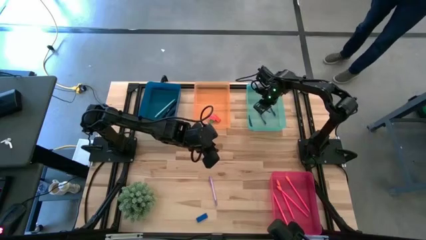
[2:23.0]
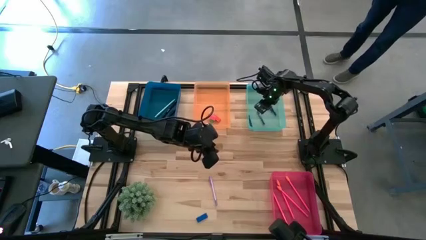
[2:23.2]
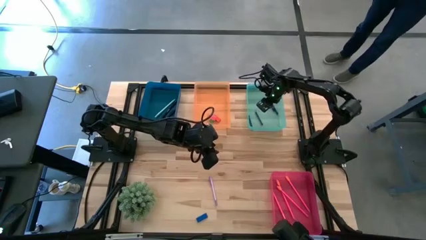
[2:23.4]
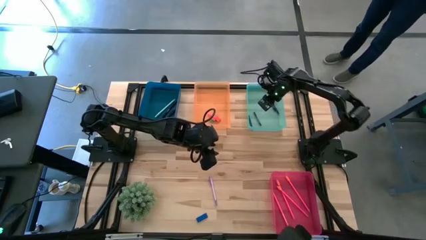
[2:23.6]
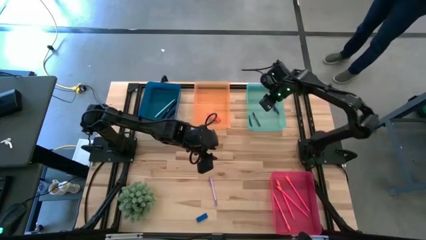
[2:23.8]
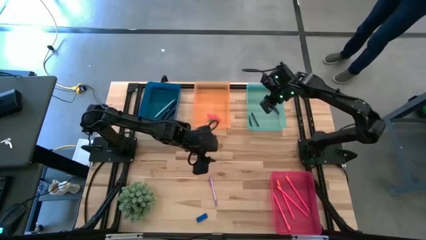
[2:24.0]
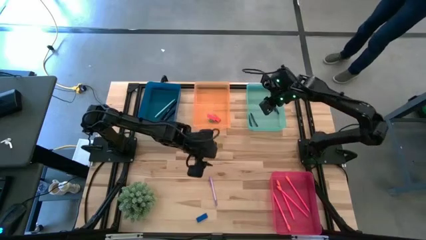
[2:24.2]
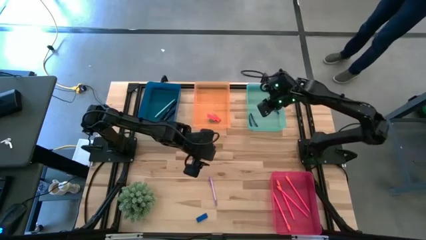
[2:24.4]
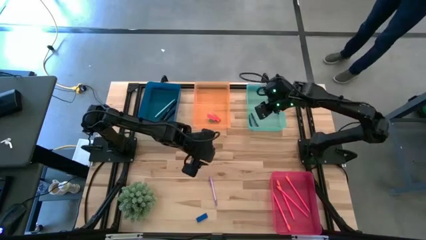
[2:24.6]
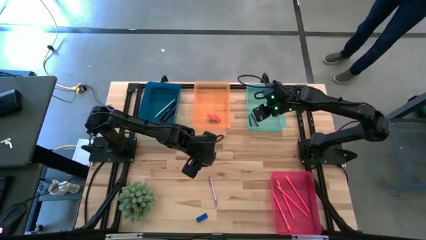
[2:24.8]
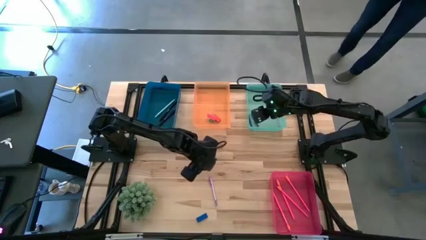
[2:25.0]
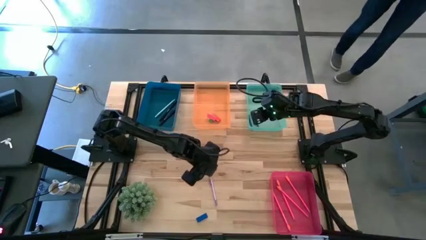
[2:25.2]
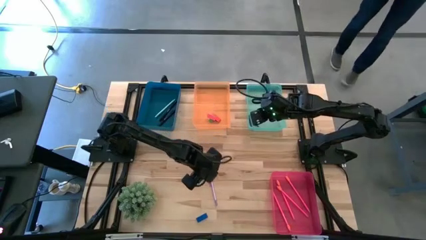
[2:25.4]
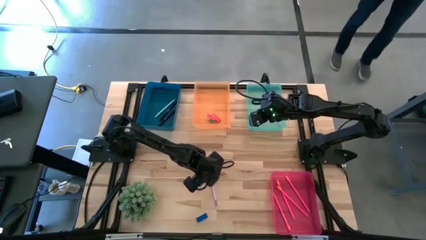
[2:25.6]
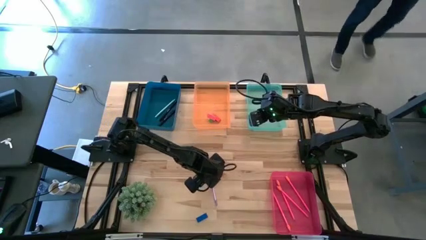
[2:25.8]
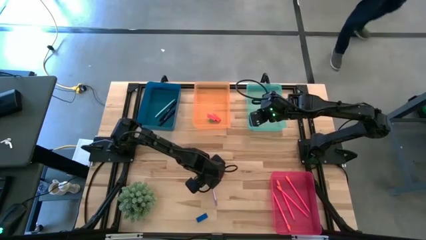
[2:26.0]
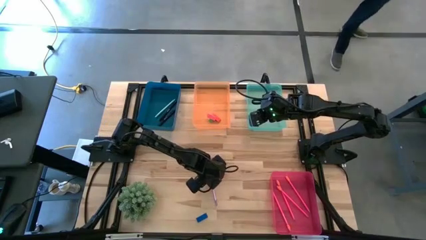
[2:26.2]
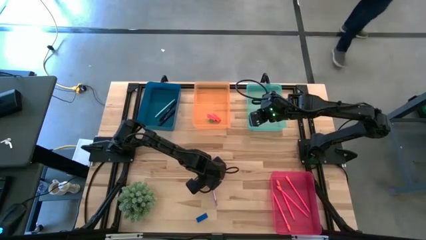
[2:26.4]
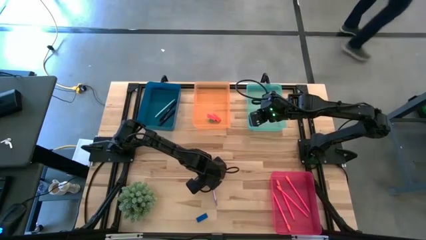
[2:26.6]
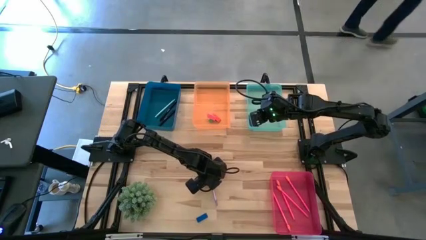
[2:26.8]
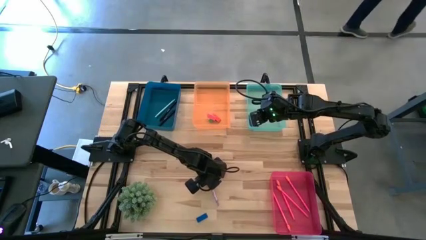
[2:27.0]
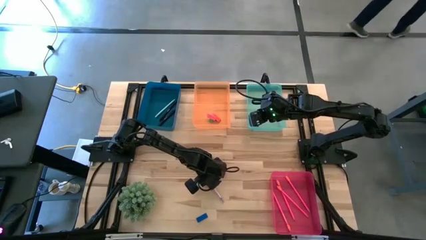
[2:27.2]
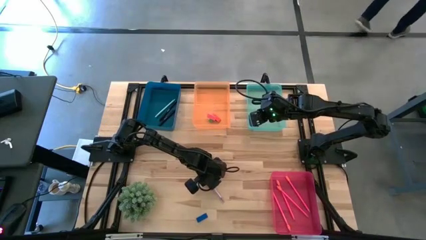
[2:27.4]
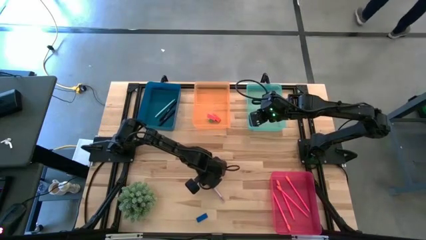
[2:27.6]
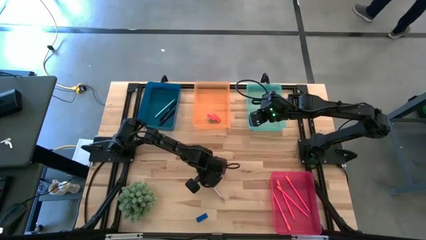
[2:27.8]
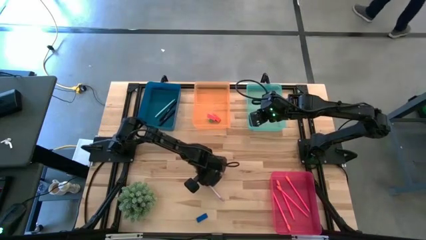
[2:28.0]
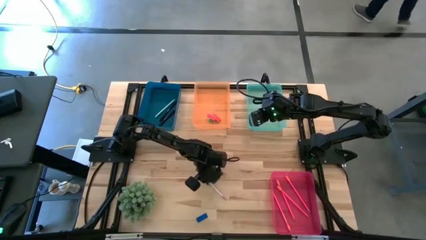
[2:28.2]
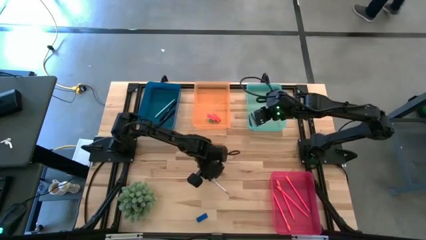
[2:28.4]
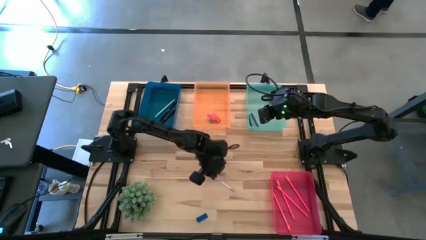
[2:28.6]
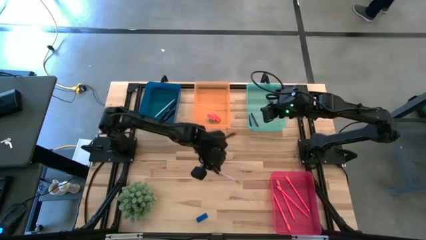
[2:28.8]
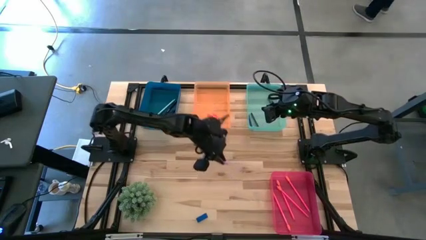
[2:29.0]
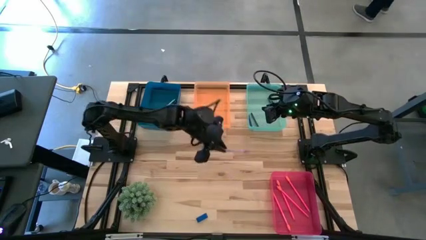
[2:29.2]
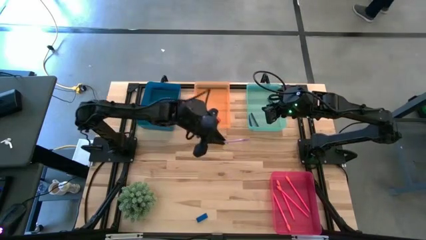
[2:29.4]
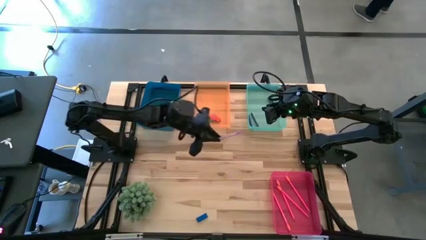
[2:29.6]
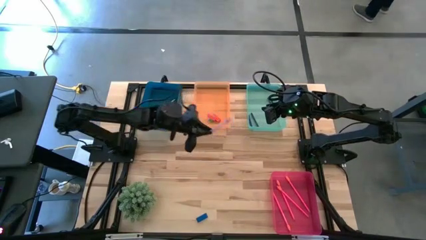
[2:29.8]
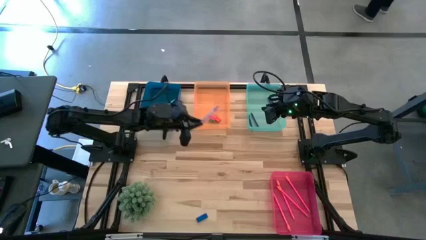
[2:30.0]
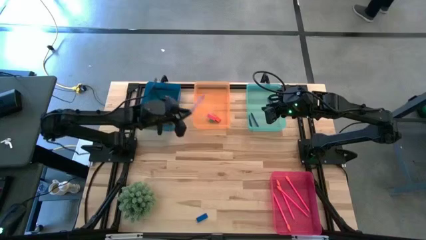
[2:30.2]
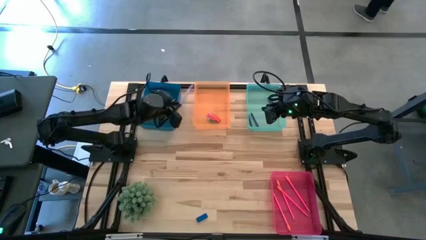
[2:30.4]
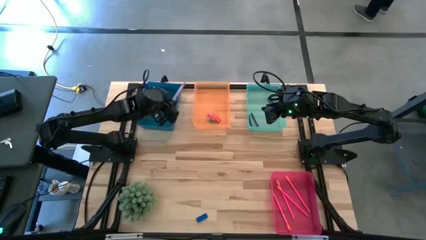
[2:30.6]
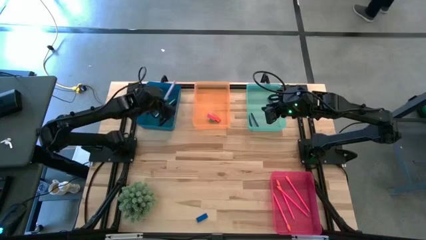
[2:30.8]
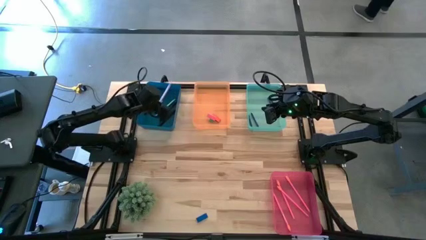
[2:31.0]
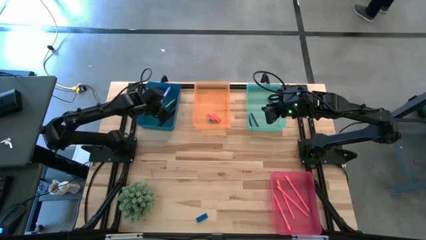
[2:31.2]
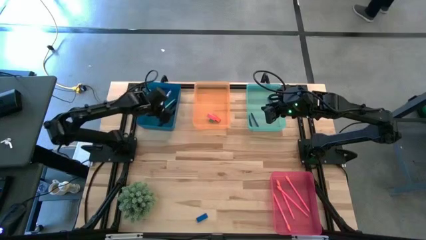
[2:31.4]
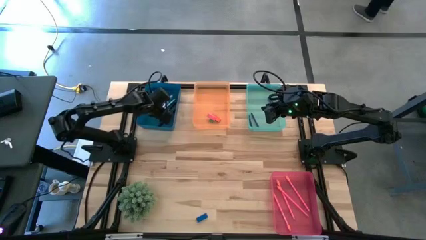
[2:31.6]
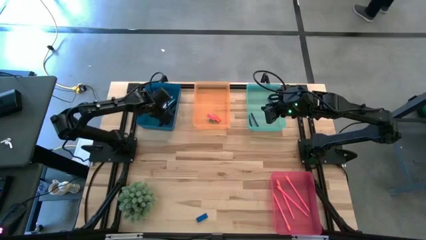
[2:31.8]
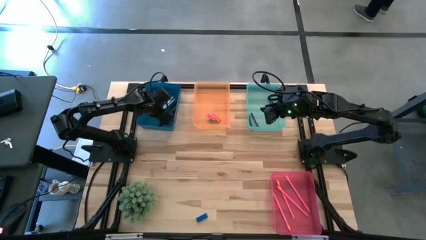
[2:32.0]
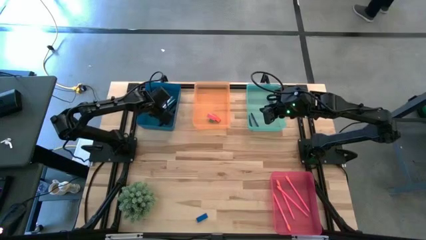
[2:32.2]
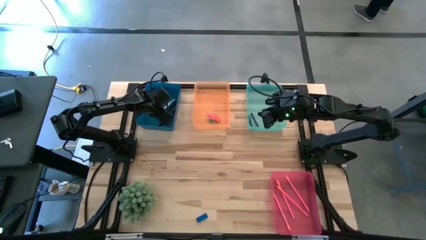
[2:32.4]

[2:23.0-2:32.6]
Task: Sort crayons/erasers/pens/pencils in bins
Put the purple pen into the blue bin
